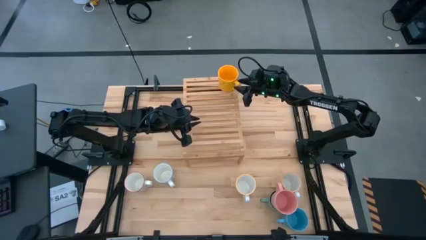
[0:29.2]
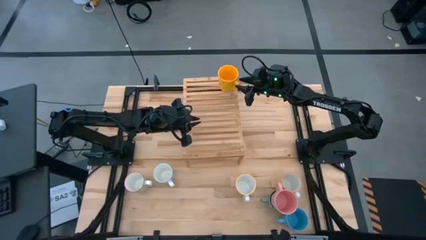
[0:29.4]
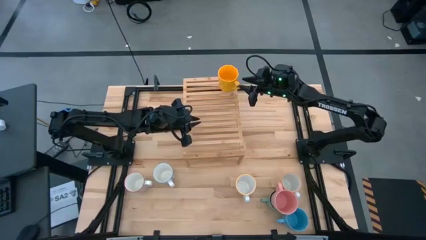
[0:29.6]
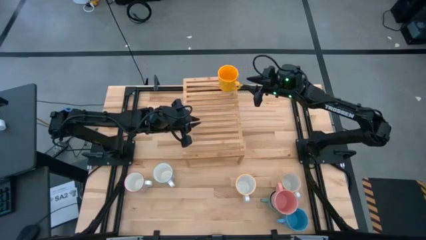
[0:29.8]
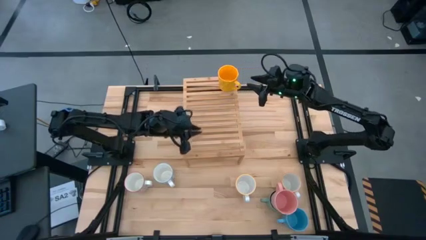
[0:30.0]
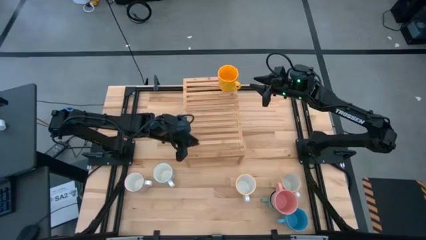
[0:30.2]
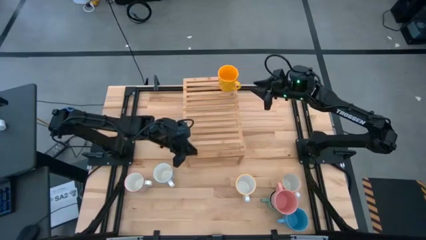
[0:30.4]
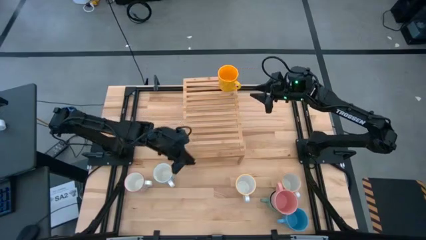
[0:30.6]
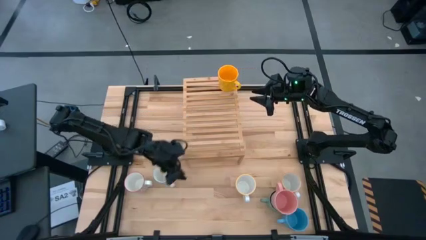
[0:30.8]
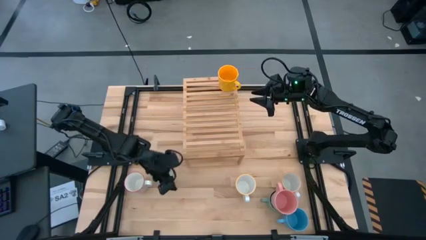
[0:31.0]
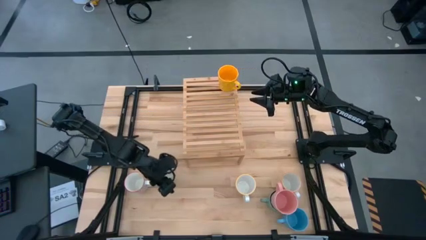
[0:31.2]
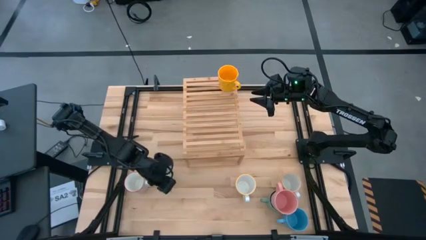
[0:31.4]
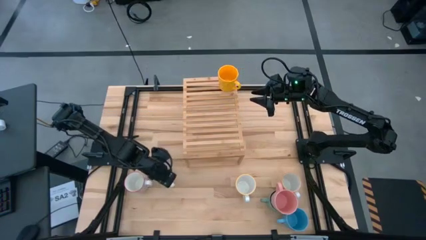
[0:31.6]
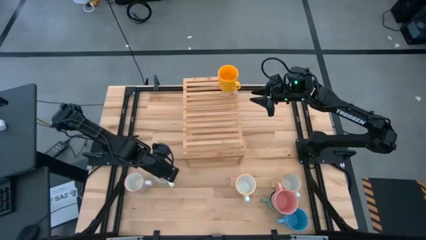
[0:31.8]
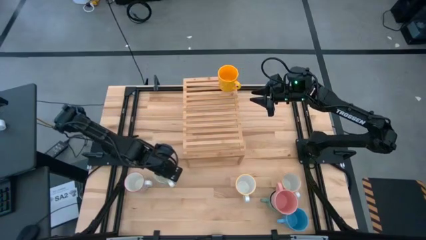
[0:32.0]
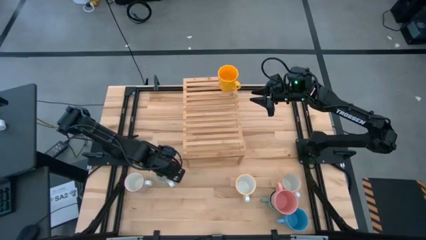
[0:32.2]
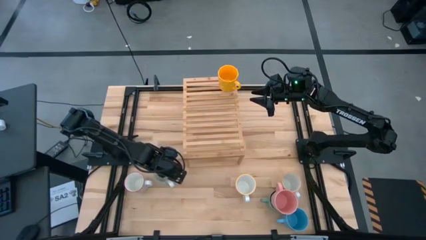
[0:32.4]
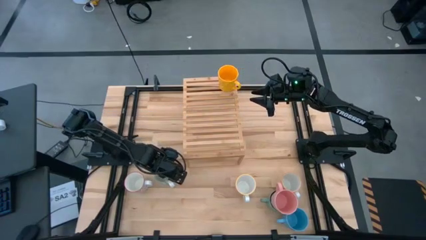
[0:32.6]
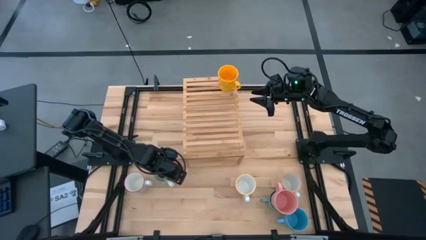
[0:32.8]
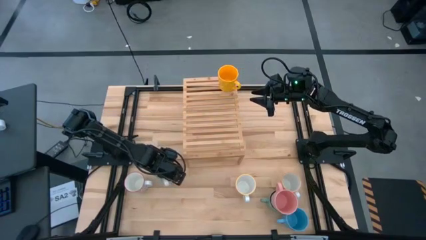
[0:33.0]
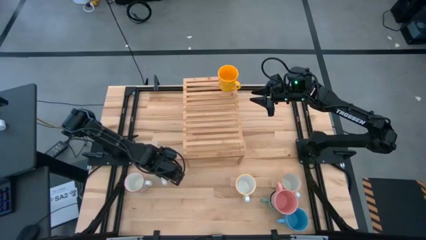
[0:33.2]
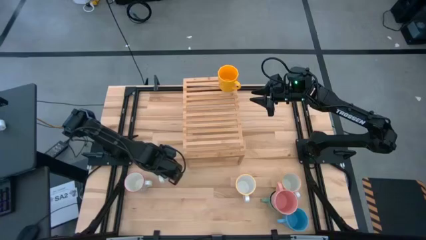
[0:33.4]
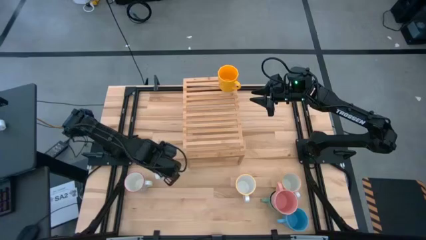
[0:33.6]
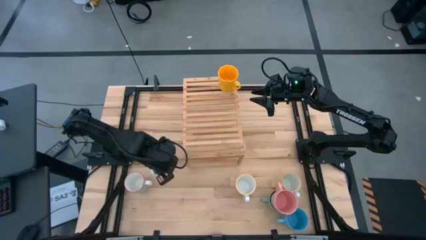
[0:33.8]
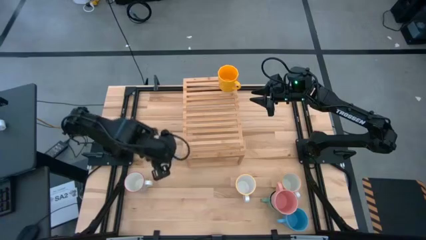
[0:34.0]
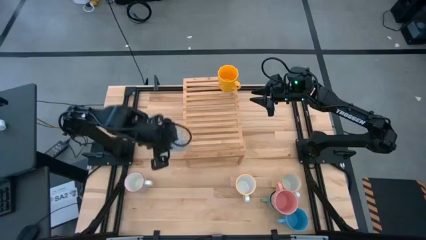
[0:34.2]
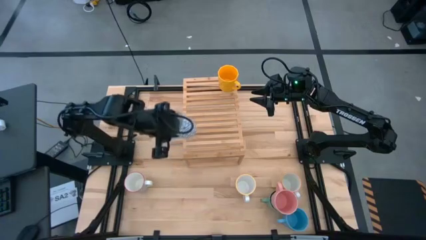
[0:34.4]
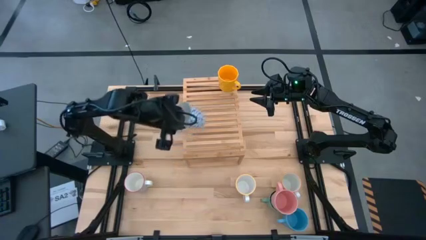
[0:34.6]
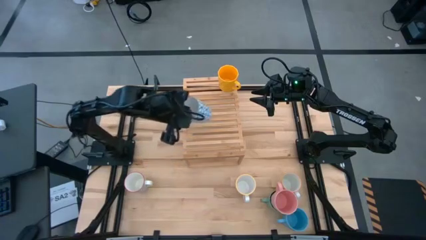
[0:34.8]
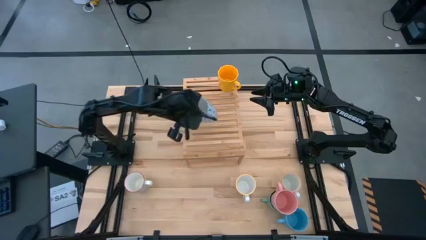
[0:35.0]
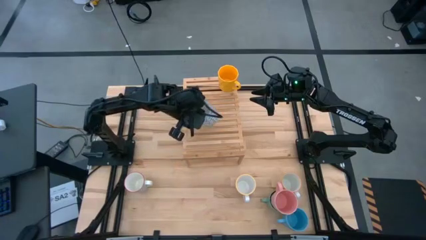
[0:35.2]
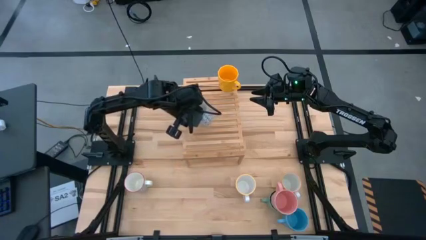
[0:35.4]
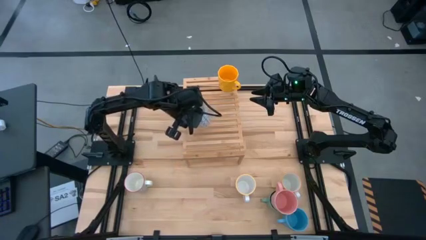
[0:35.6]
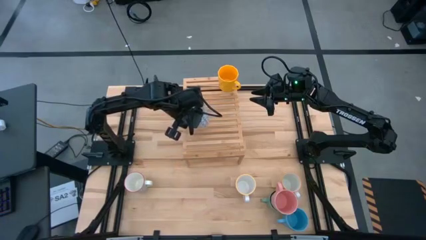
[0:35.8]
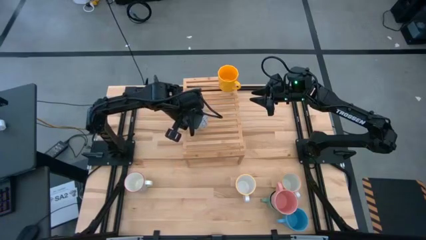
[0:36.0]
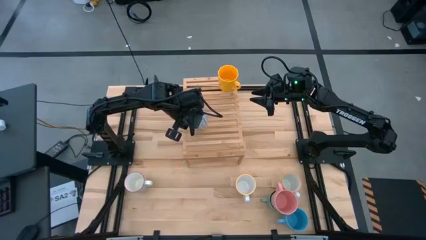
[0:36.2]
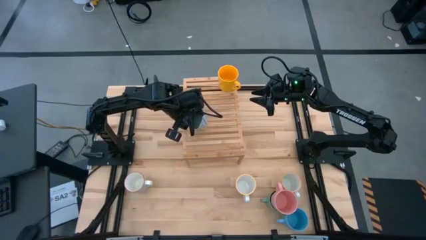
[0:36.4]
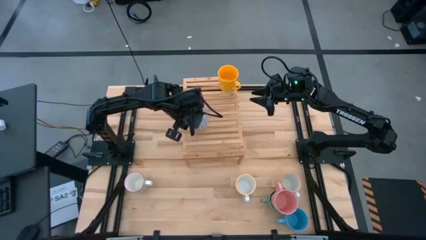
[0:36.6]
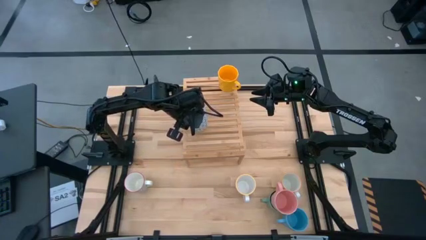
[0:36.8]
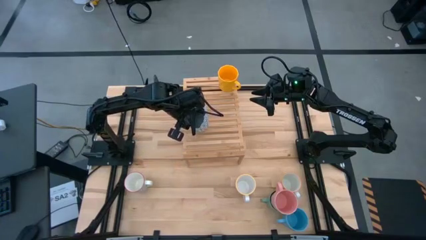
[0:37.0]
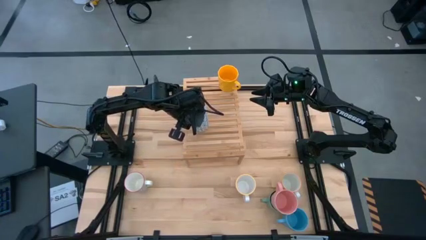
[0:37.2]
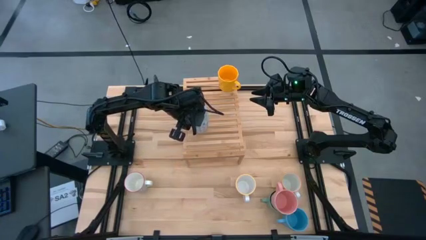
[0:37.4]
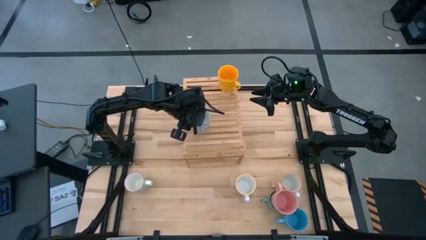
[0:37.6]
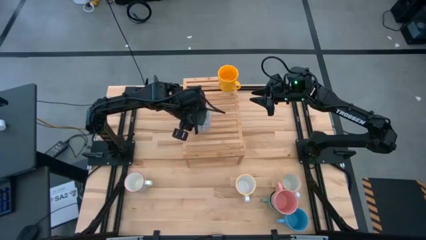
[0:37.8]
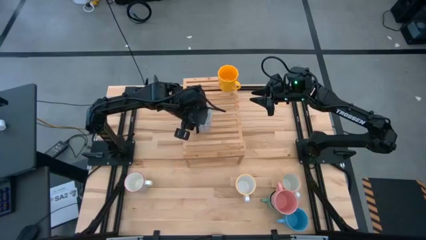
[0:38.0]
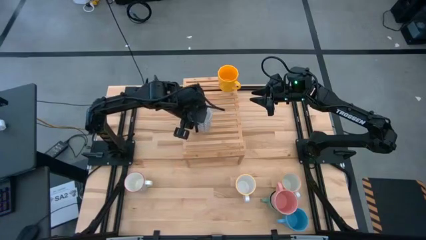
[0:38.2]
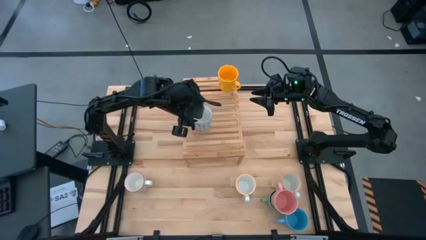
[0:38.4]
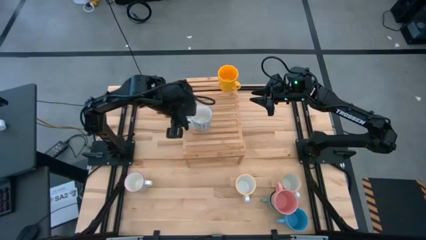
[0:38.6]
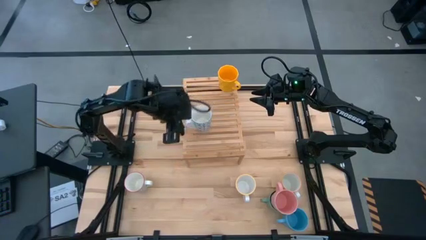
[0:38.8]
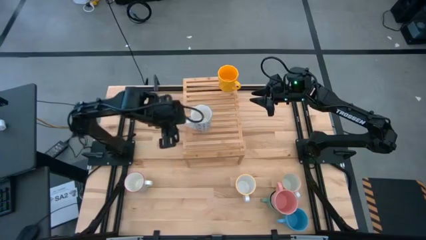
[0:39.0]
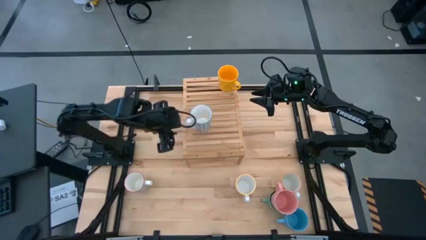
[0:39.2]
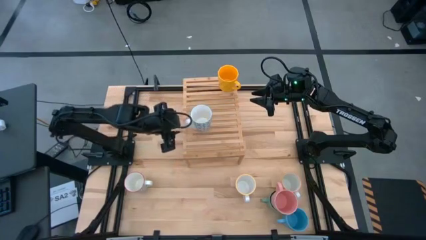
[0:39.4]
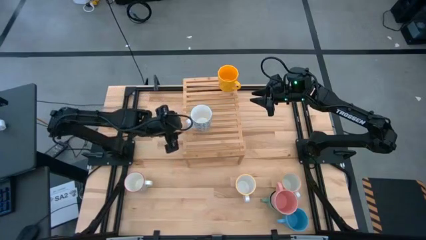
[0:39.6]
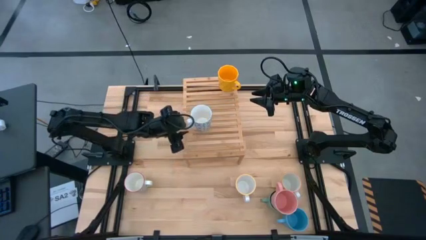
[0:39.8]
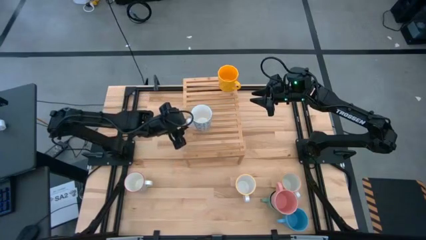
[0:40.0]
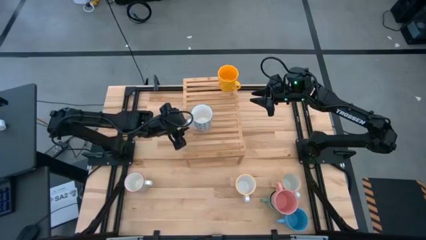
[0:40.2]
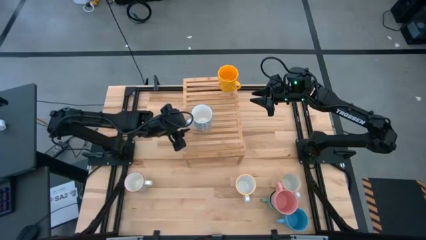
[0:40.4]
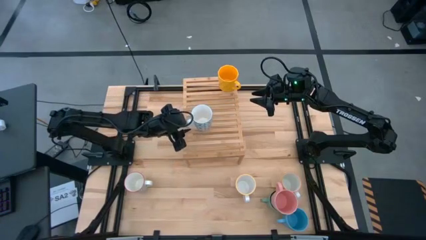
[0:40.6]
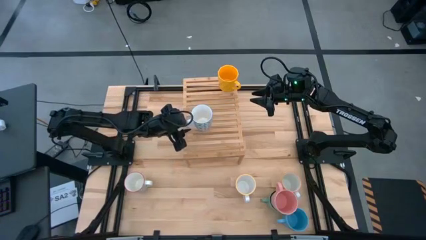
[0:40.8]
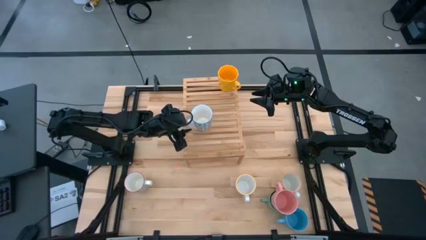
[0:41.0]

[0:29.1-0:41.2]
Task: Place coffee mugs
Put the left blue cup on the shelf

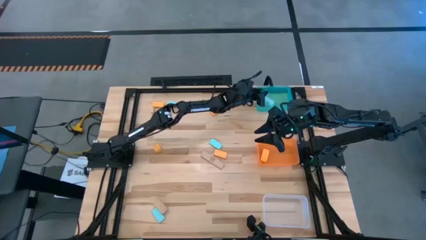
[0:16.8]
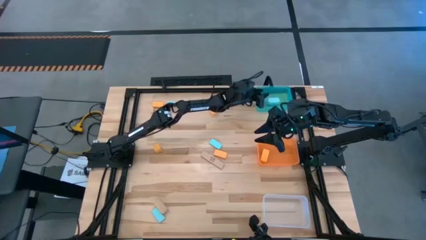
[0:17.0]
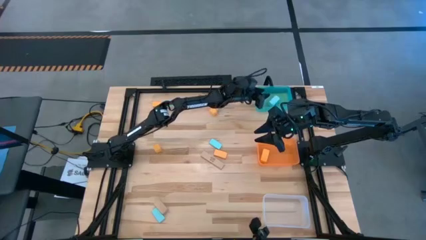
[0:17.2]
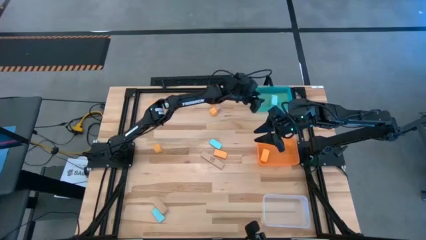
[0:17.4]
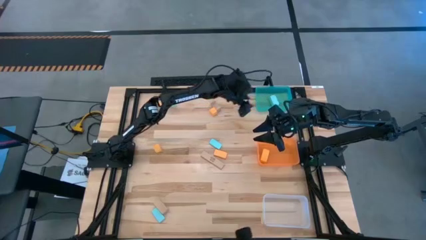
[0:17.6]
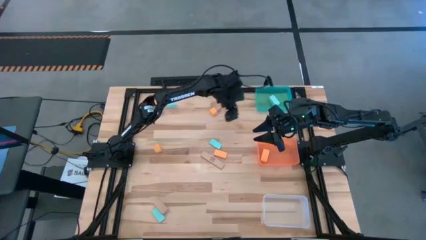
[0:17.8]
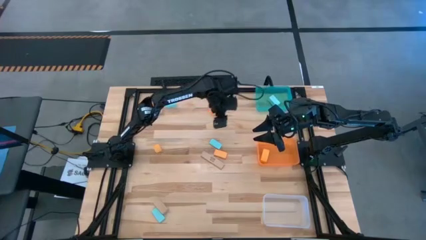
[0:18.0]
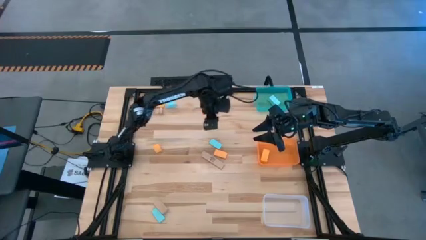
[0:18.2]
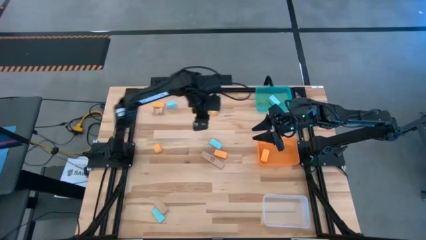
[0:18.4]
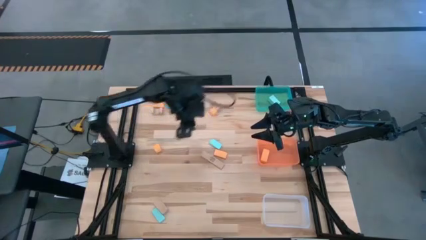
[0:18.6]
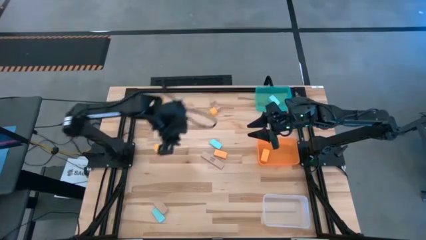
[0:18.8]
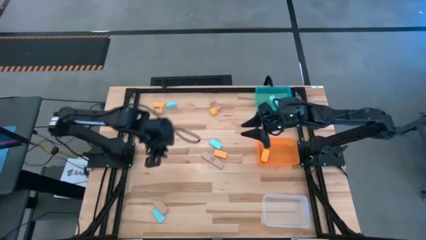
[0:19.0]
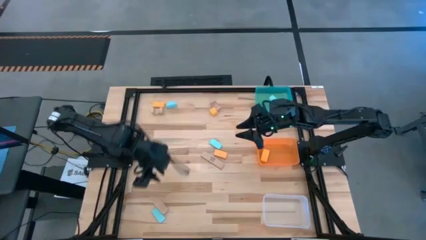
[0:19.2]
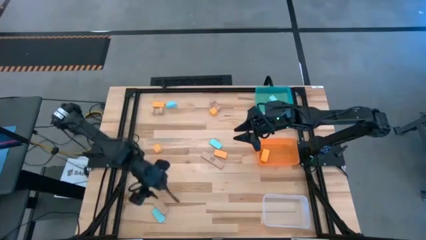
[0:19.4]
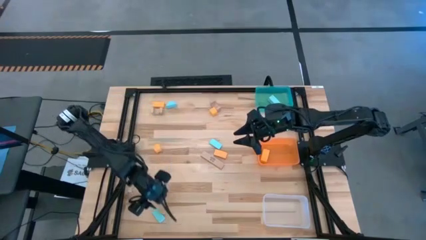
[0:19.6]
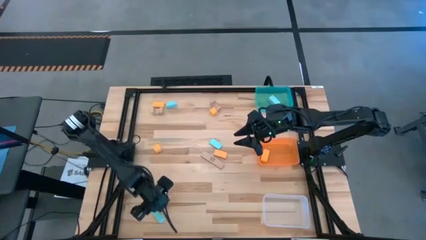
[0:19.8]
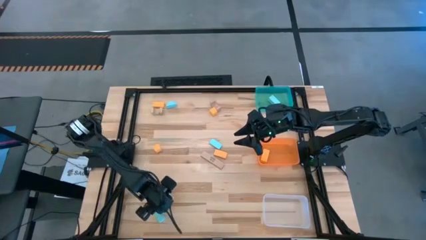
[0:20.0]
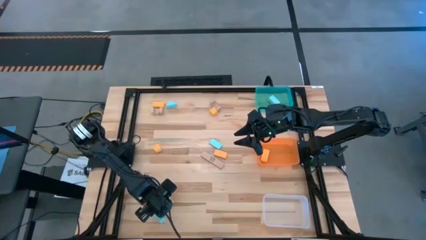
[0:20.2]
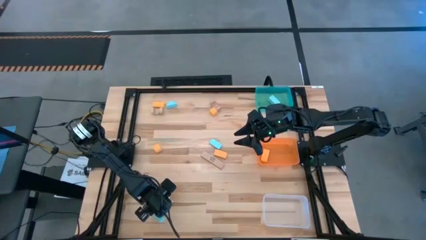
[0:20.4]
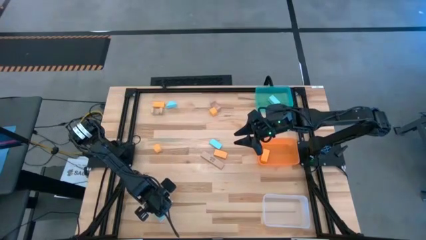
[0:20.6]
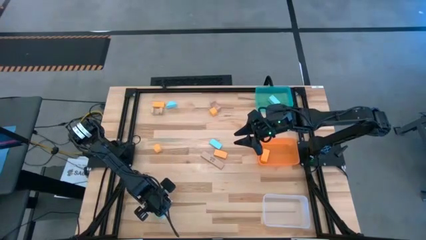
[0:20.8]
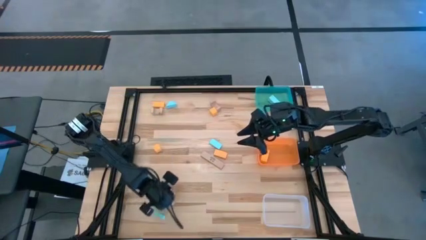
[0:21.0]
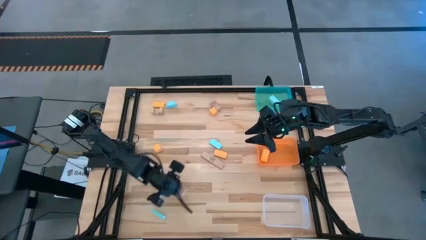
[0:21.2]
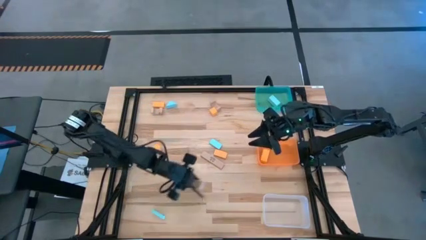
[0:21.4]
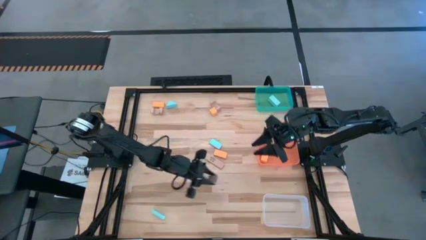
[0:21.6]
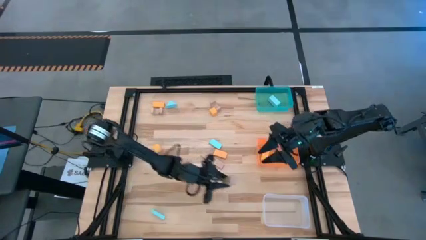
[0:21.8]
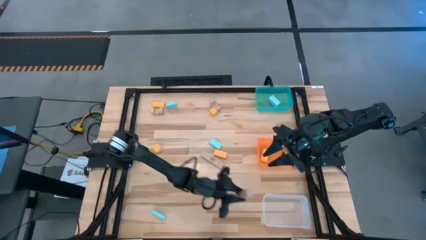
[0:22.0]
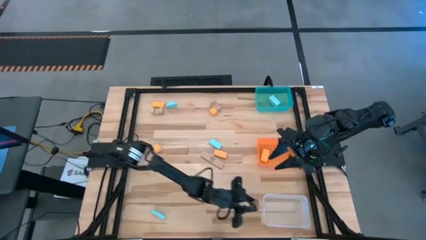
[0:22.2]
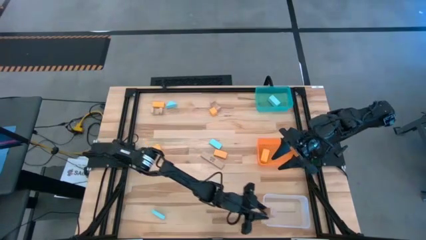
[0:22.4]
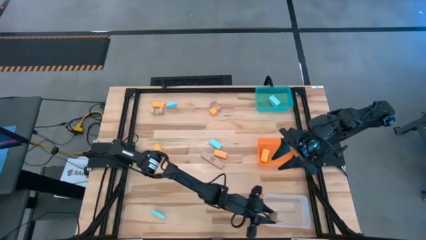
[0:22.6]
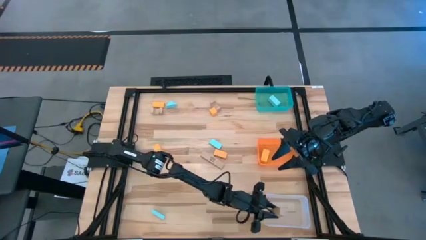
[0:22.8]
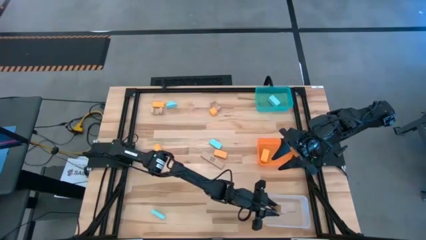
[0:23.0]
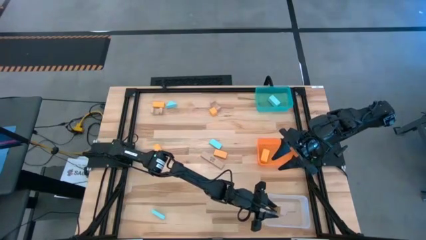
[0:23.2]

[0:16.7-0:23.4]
Task: Sort & place blocks by color
Put the brown block into the transparent bin
